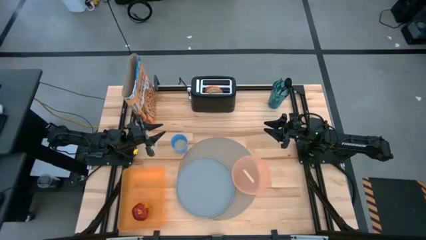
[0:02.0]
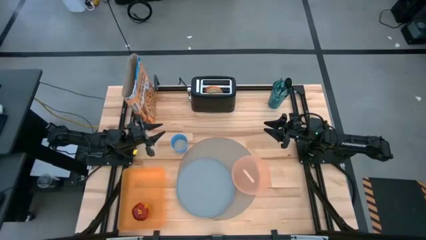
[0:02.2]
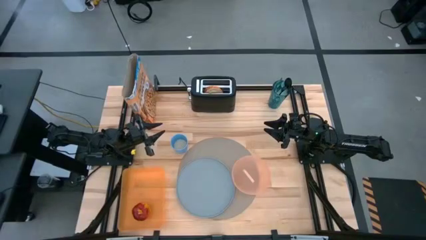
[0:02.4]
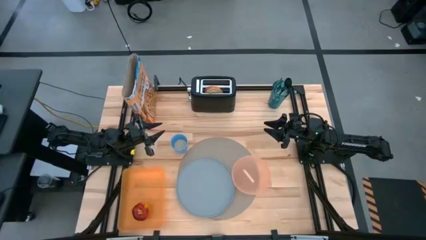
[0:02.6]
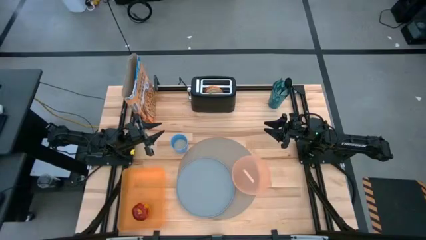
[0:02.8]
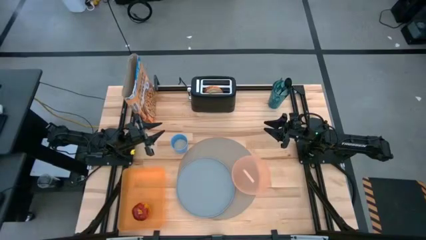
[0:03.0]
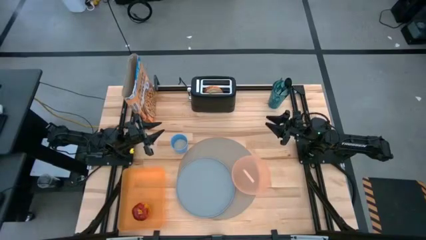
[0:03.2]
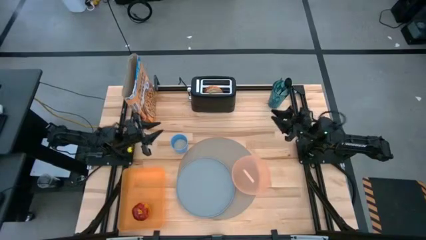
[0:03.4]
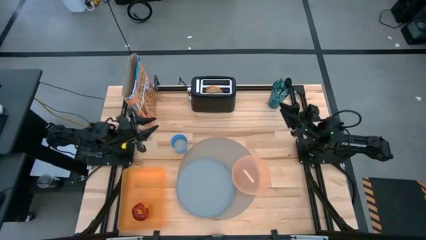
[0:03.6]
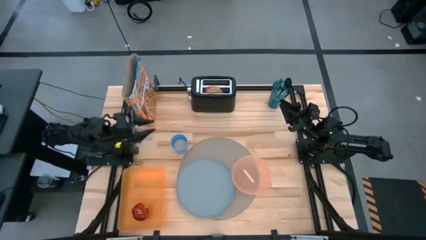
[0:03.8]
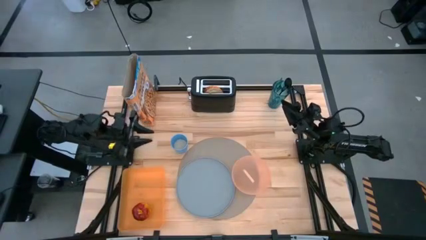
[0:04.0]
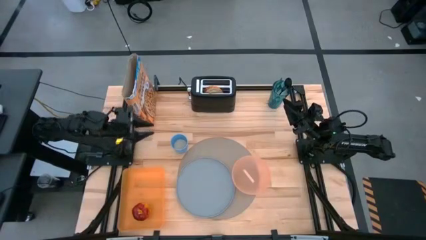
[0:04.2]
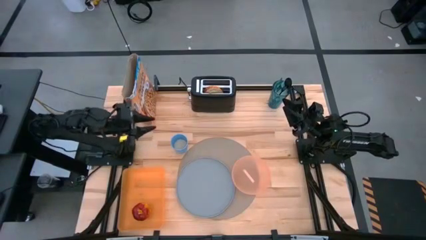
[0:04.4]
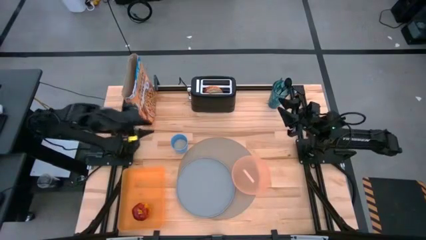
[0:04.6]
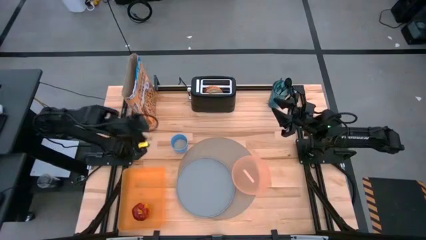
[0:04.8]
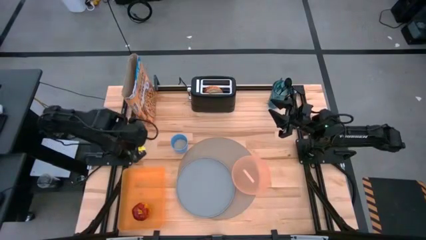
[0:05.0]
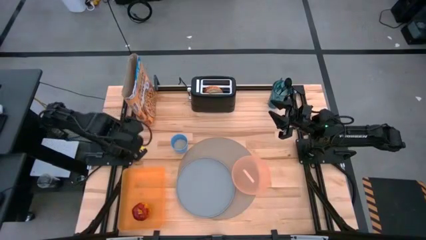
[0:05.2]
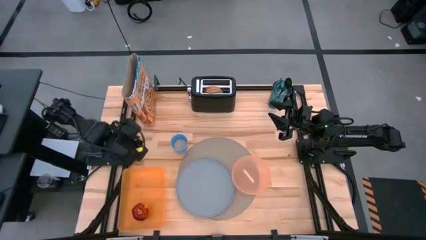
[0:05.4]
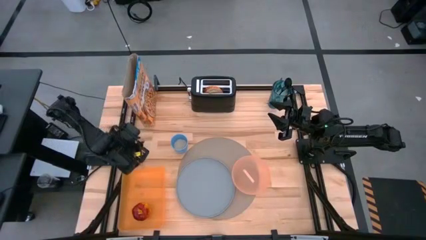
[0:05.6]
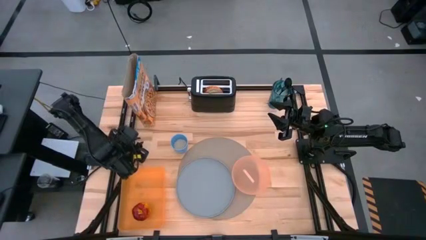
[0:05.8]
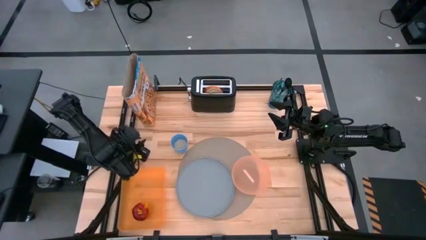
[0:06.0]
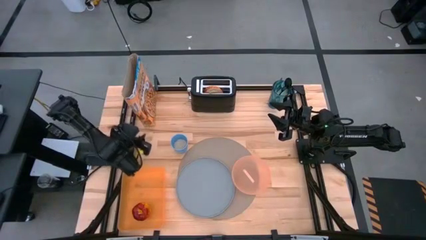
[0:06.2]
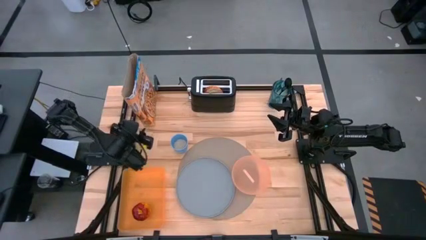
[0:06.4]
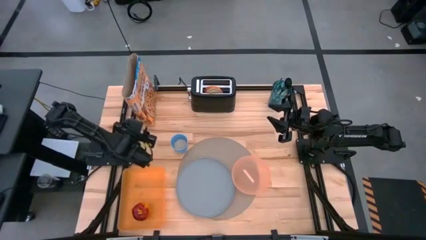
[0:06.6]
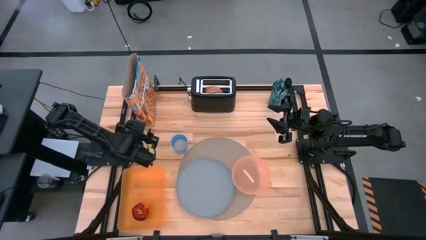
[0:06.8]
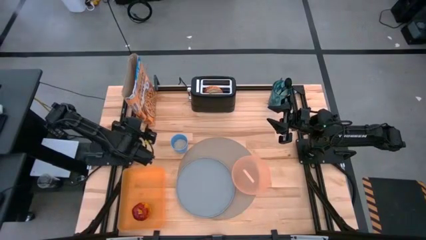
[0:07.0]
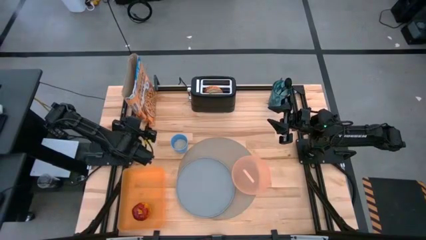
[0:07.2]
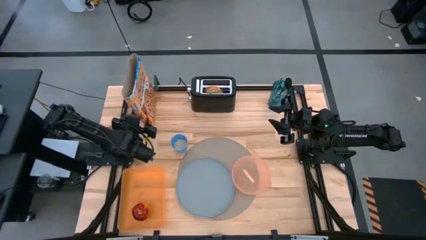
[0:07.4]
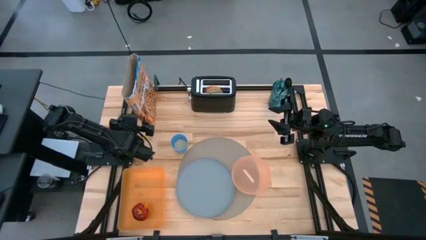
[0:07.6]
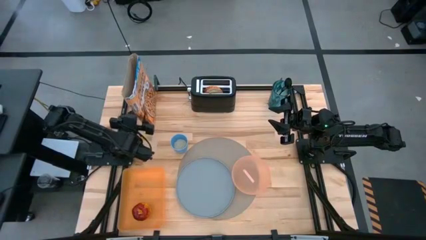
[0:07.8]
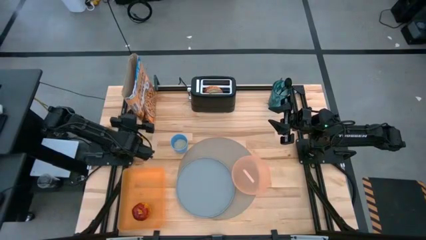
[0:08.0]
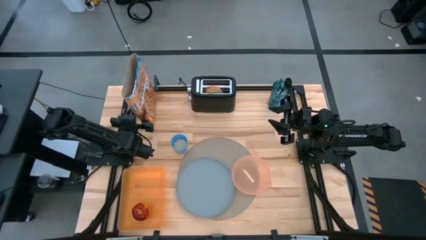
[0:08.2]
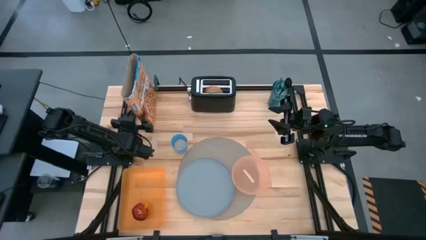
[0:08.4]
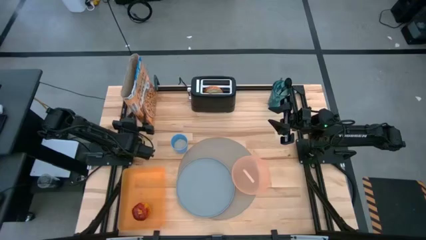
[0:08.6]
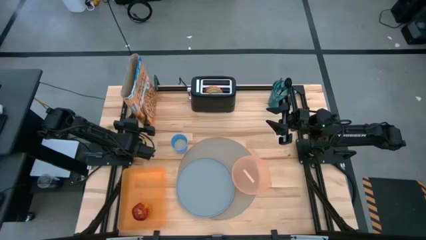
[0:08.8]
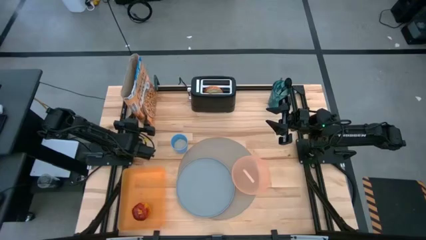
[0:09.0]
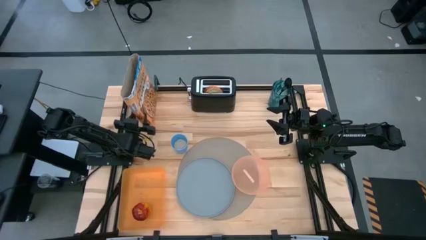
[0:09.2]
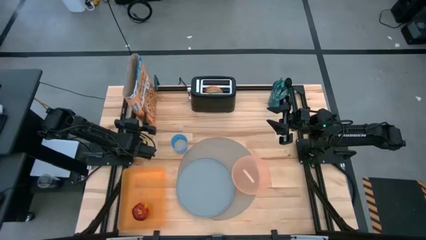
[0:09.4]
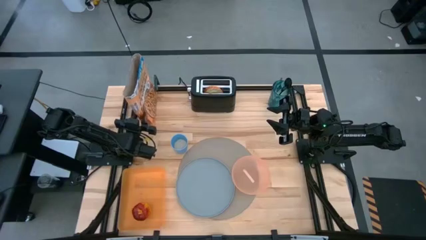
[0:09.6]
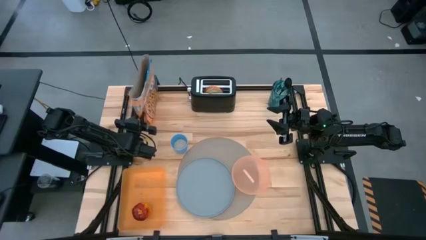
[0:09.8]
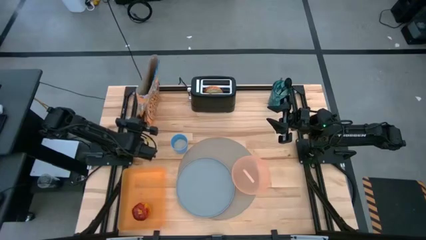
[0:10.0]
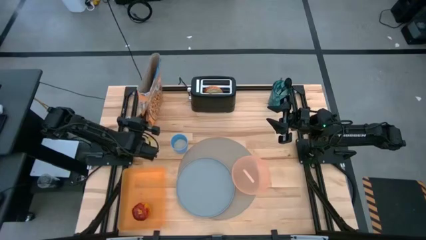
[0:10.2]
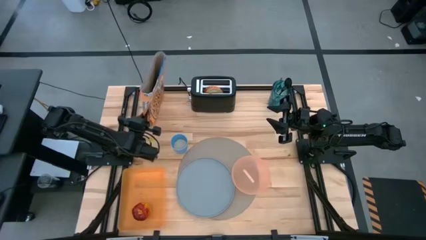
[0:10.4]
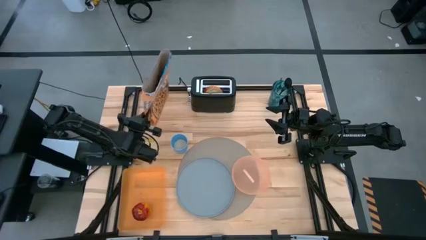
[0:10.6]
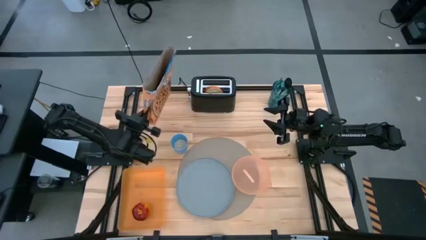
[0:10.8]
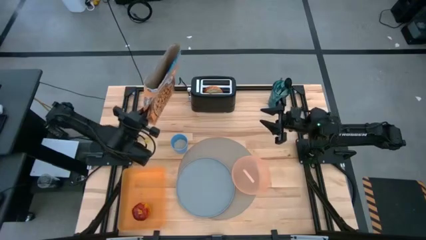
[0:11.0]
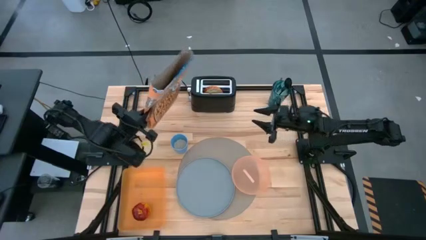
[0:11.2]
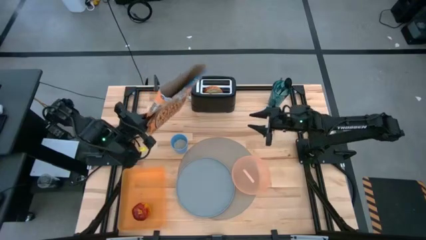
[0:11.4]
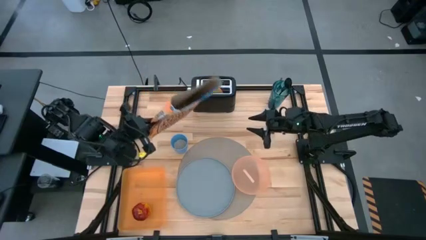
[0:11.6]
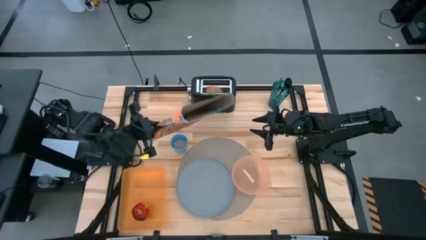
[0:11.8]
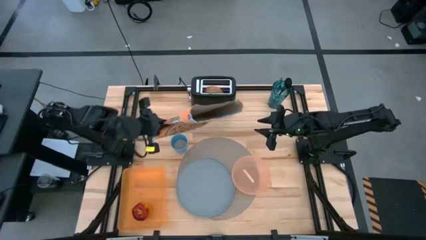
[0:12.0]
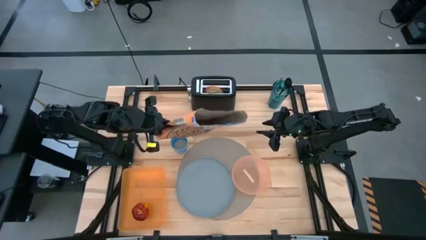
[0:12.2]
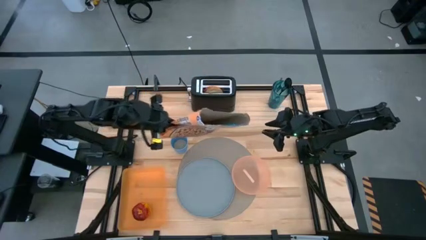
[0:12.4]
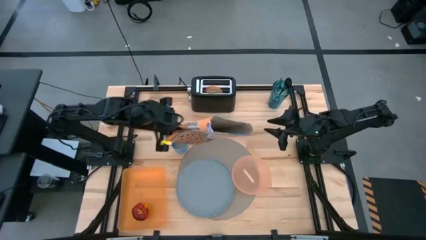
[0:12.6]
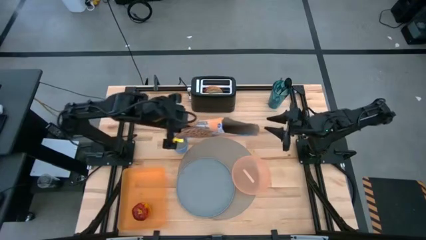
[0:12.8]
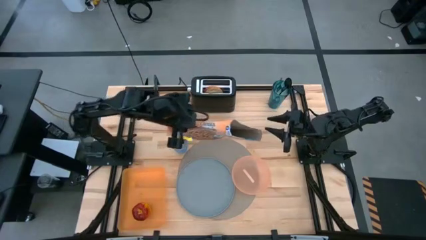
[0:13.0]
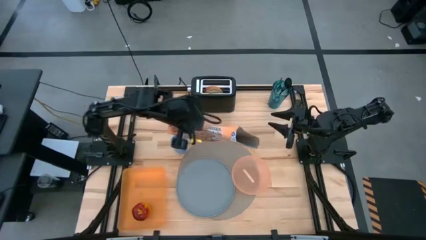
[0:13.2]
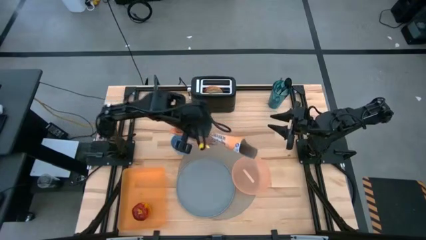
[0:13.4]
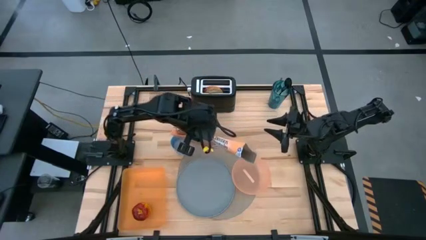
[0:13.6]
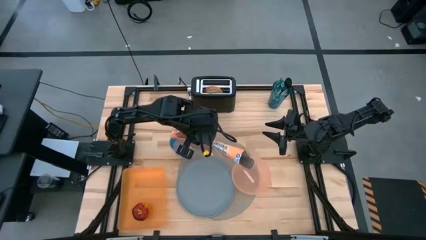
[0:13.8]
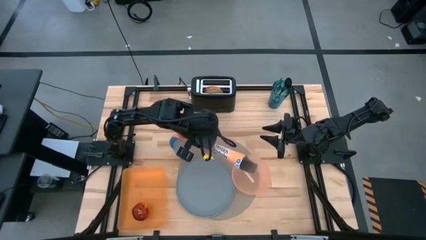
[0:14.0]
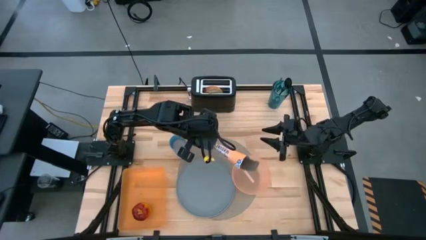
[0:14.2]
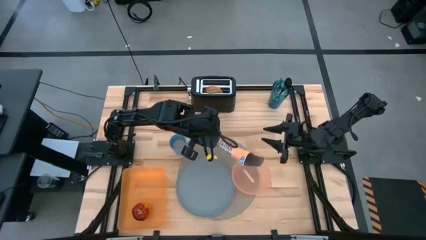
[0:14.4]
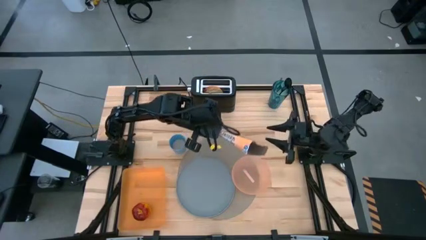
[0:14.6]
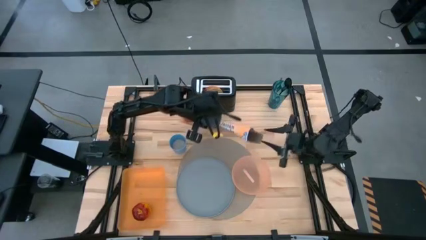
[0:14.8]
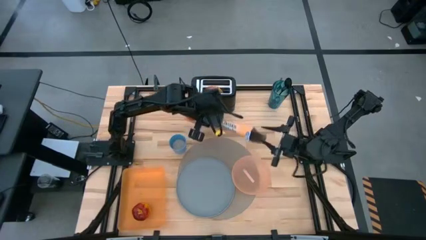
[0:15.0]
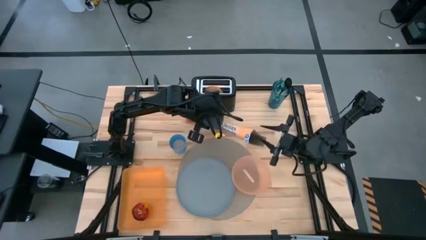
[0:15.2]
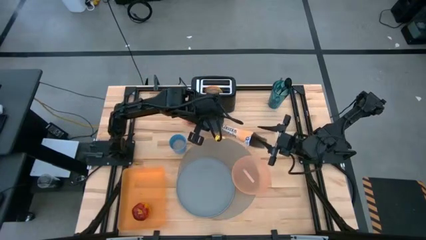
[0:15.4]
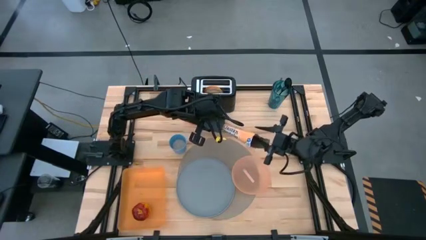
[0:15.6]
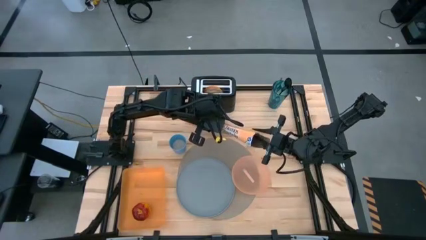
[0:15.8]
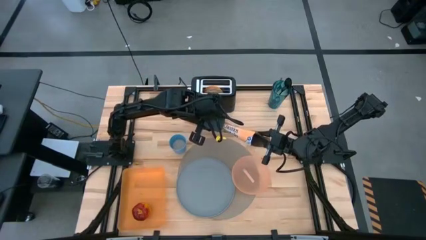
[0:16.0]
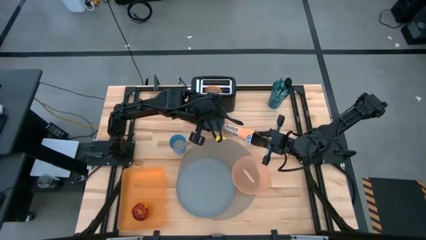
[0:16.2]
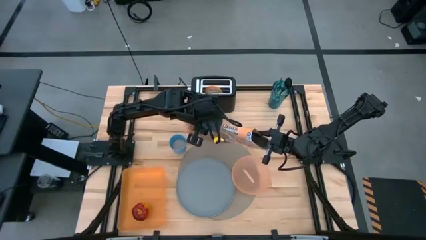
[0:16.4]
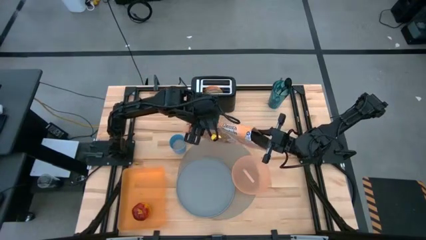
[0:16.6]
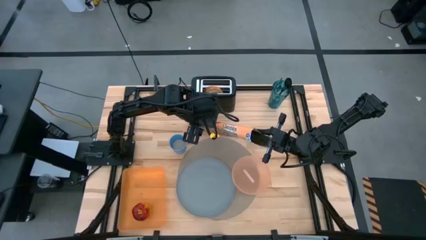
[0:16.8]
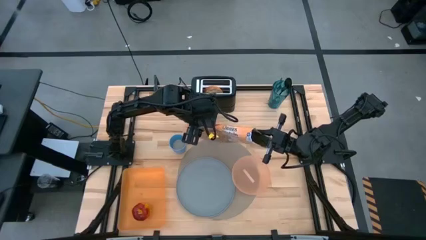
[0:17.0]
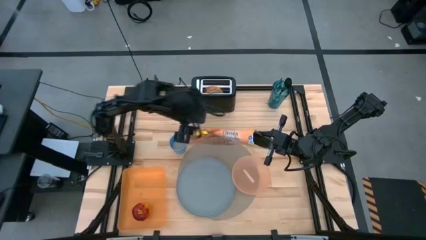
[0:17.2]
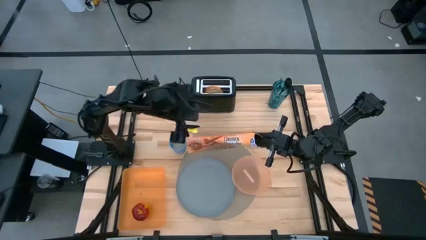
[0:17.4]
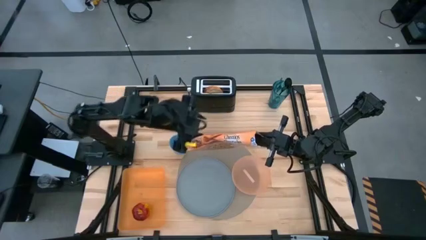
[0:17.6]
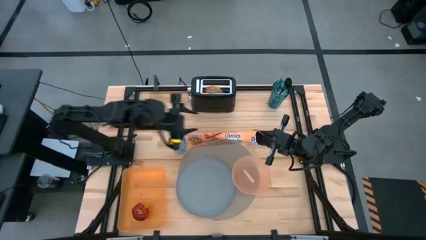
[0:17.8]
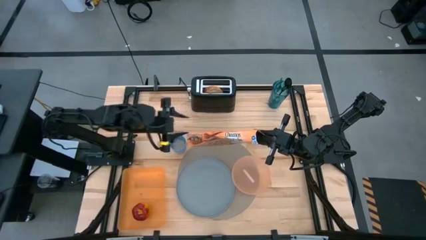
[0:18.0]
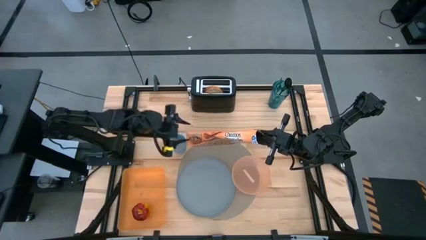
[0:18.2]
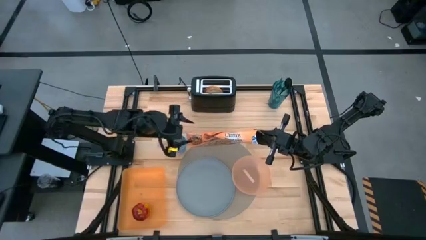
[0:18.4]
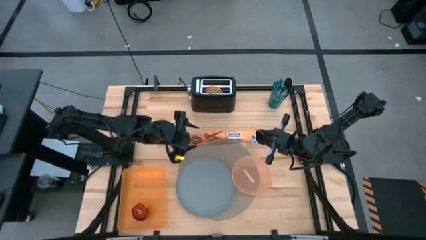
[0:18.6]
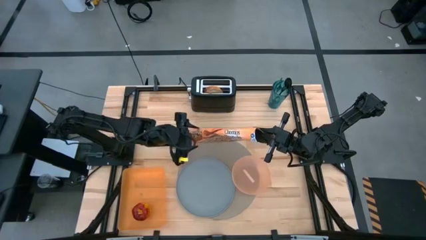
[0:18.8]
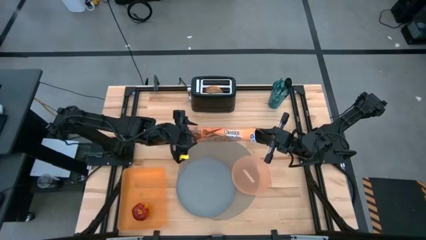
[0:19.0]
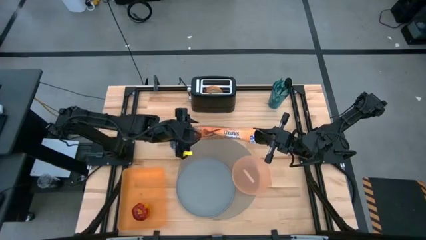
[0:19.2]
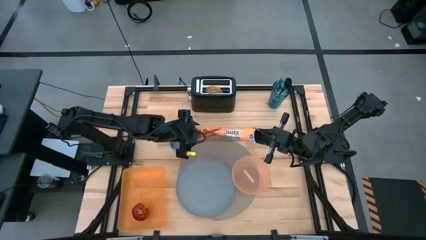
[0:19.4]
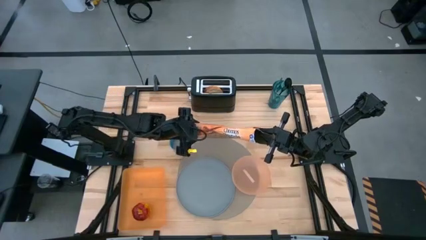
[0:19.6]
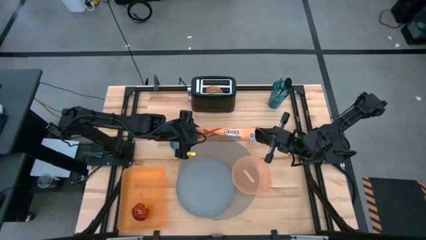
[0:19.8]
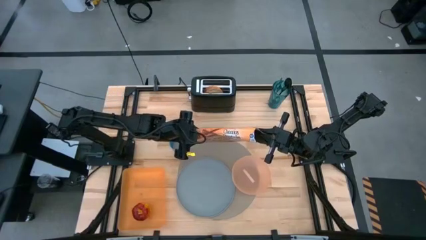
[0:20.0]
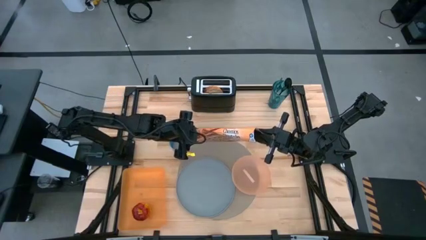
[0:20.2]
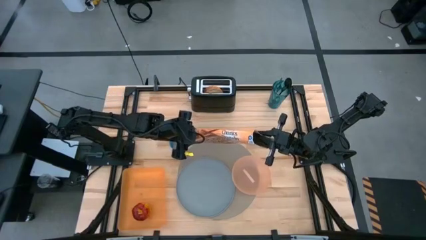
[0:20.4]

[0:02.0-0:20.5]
Task: Arrange a breakfast setting
Pour the cereal from the yellow cereal box into the orange bowl
